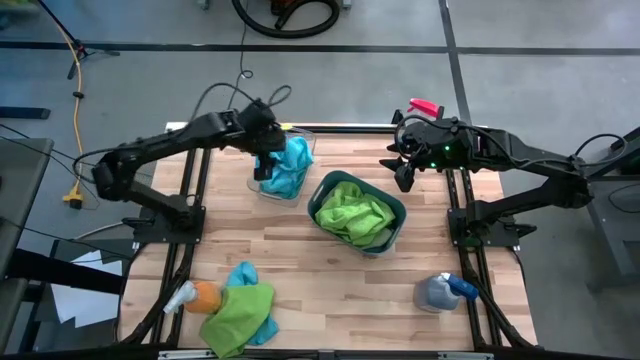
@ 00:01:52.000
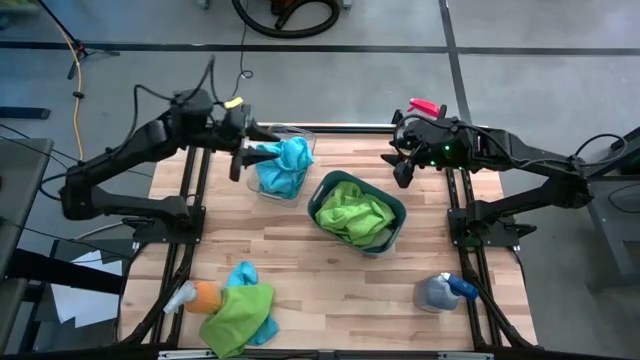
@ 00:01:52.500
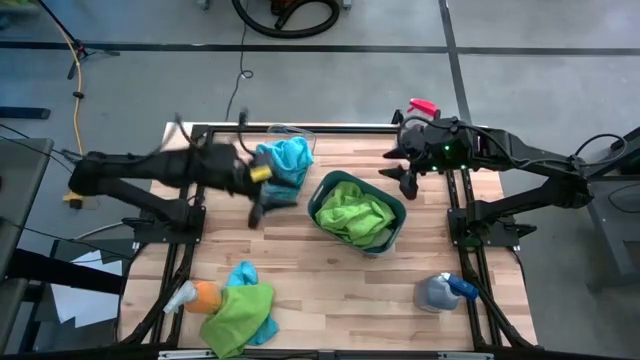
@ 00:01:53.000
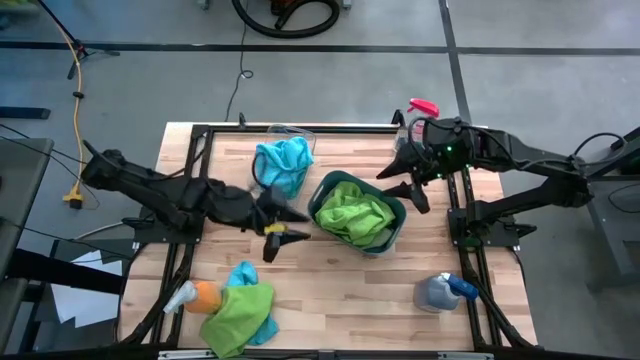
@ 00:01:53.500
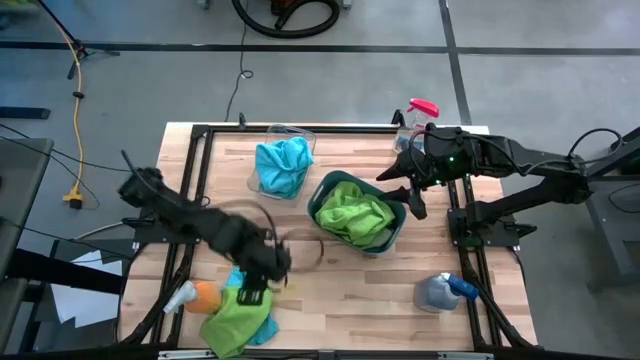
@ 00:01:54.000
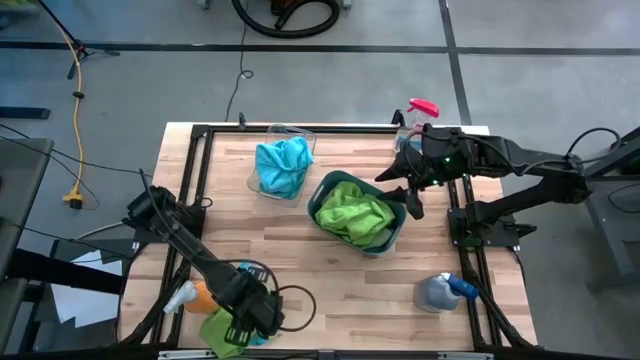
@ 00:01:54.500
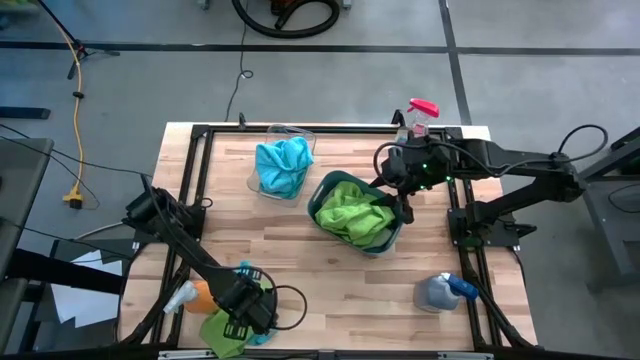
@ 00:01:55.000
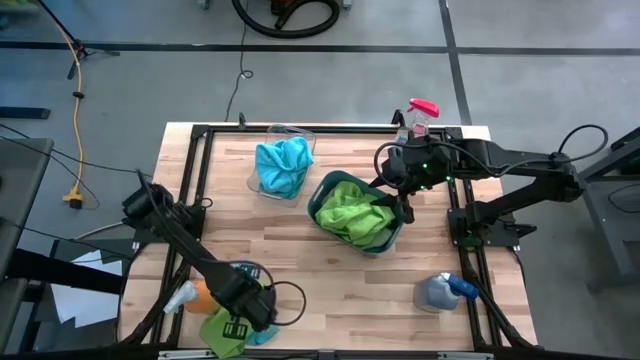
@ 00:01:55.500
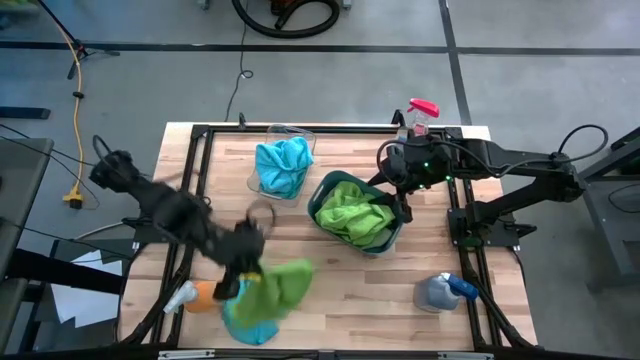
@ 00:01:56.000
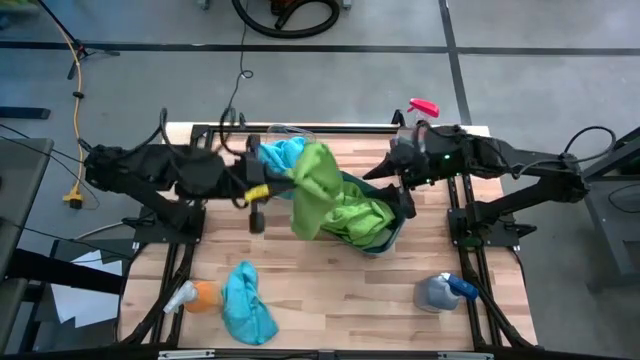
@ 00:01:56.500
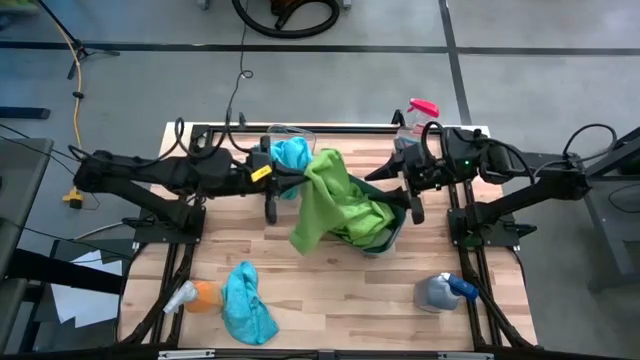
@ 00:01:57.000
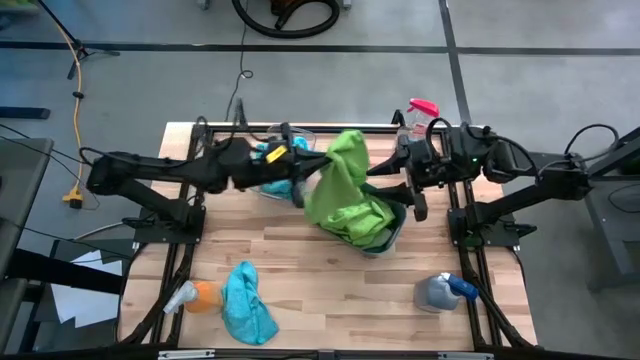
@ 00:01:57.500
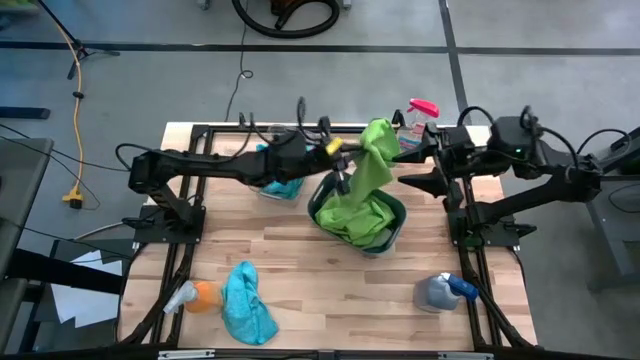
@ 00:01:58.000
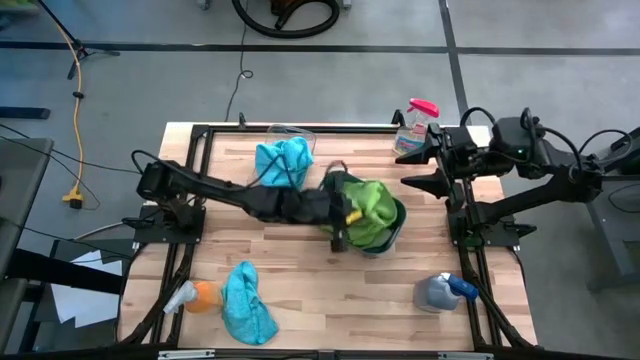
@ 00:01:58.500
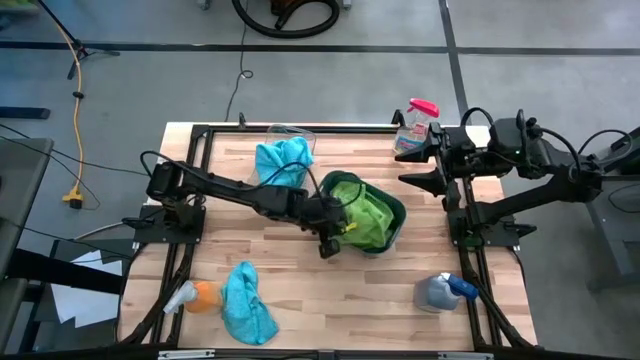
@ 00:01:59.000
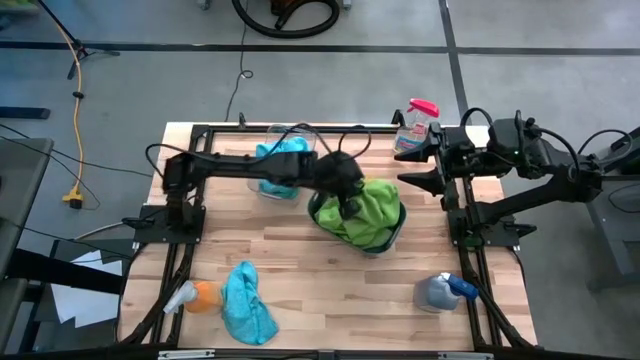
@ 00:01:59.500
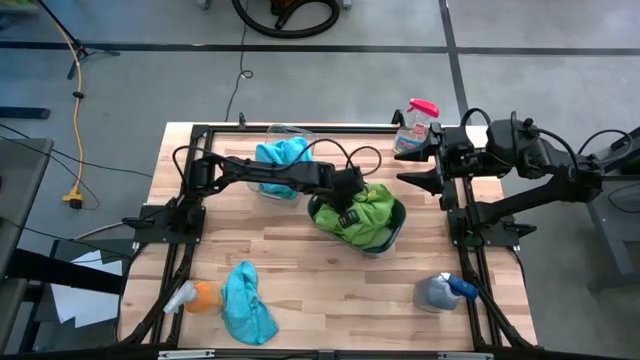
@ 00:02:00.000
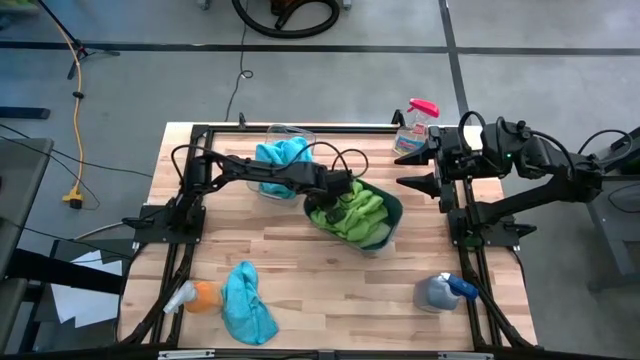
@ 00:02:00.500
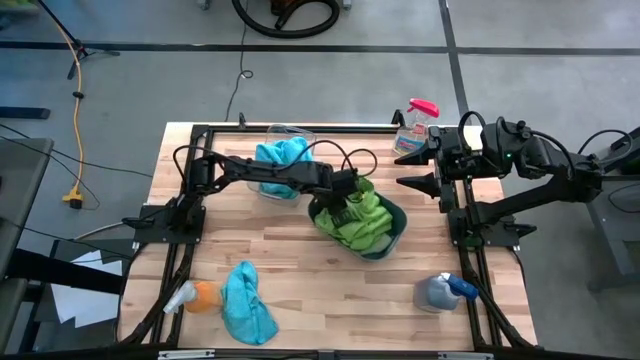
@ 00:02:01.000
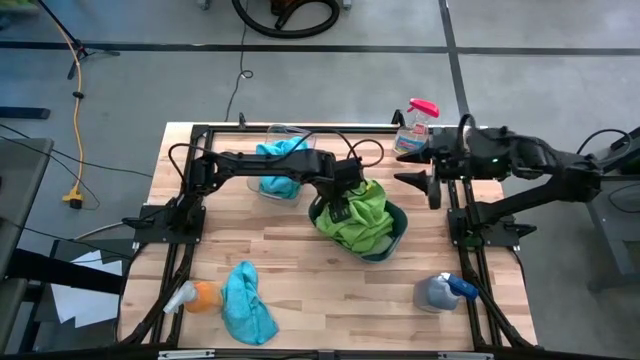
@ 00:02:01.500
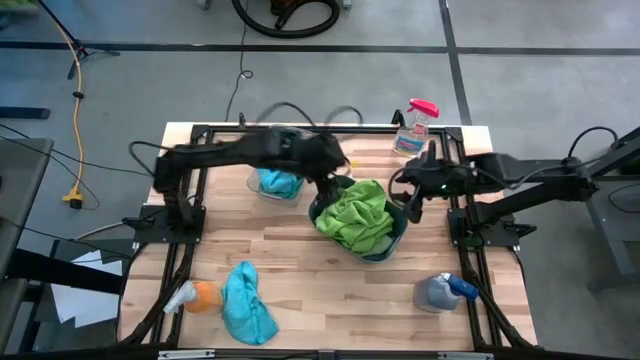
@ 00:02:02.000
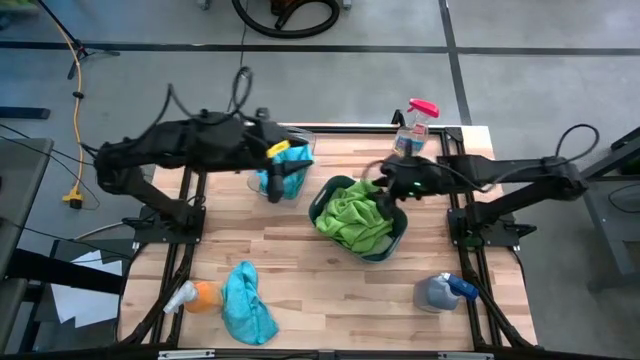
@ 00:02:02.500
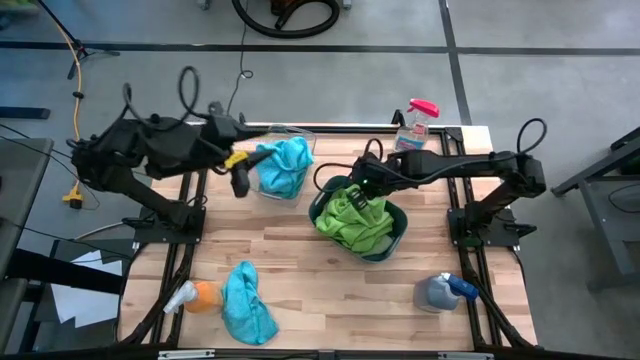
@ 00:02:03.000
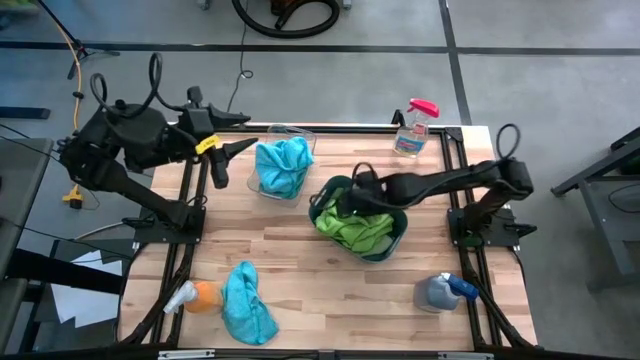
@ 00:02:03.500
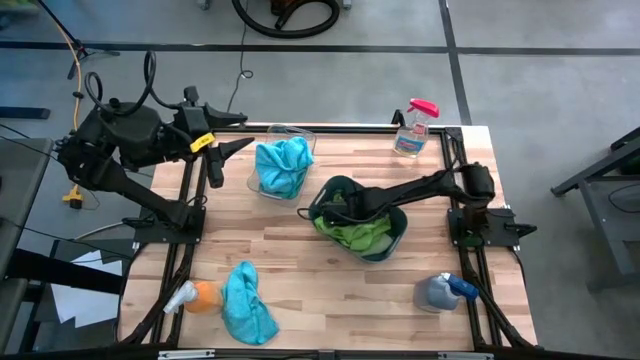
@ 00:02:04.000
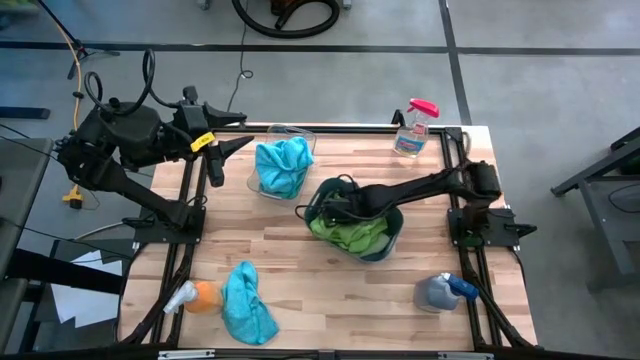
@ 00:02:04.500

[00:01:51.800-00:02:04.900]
Task: Sort microfiber towel by color & place in baskets
Put the green microfiber towel into the blue bin

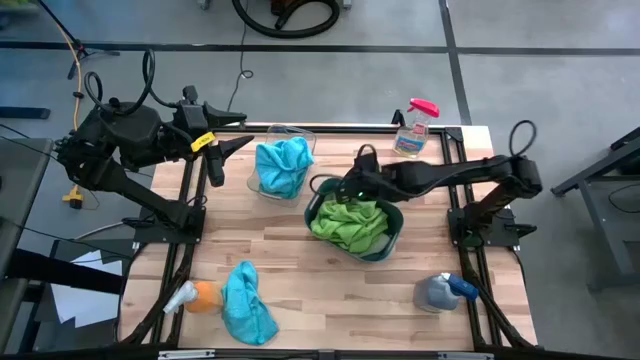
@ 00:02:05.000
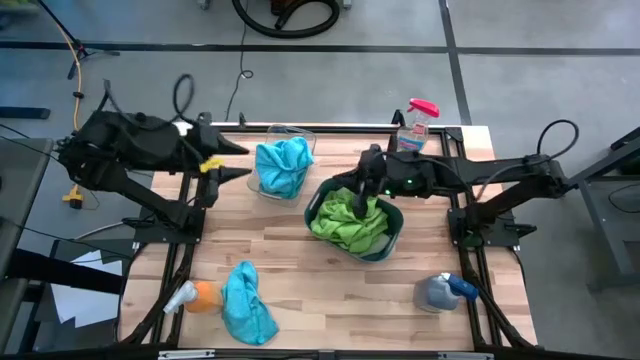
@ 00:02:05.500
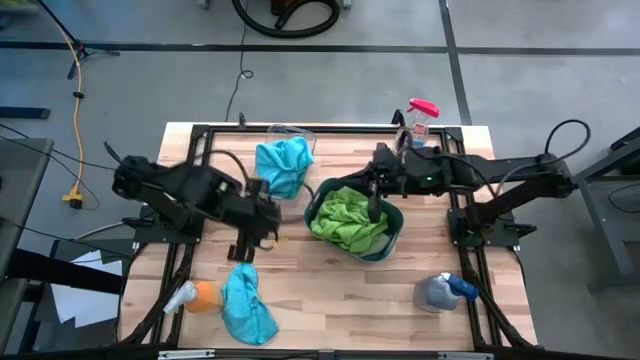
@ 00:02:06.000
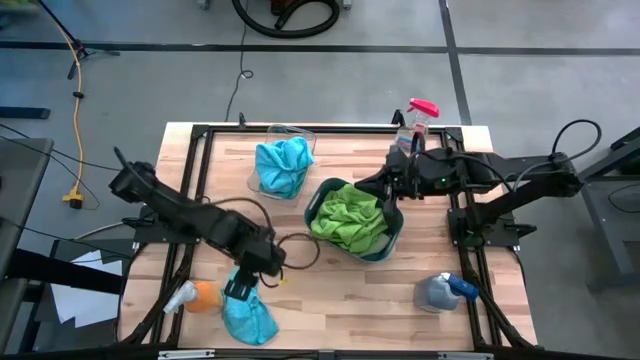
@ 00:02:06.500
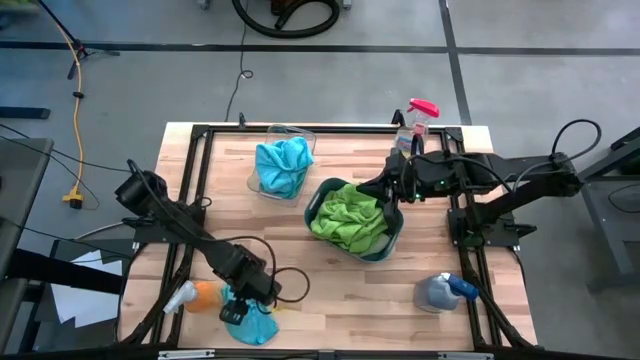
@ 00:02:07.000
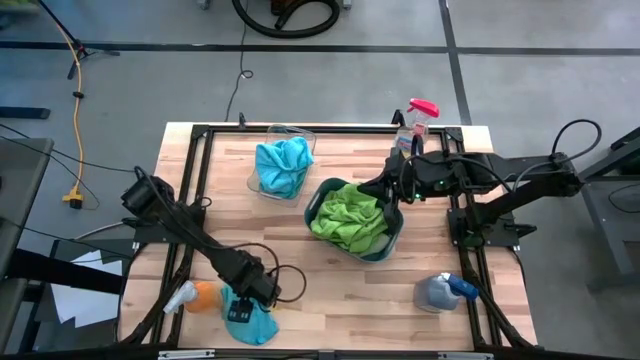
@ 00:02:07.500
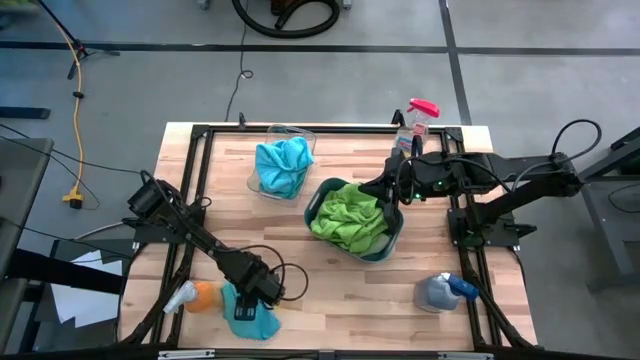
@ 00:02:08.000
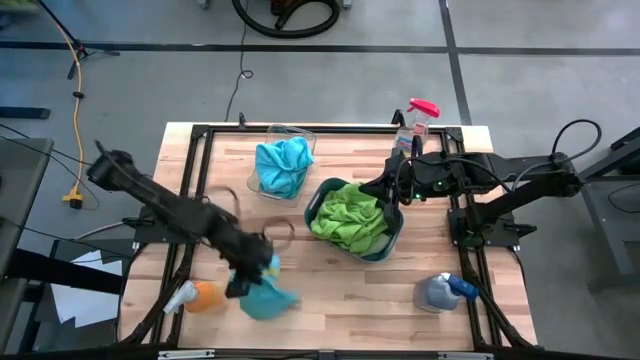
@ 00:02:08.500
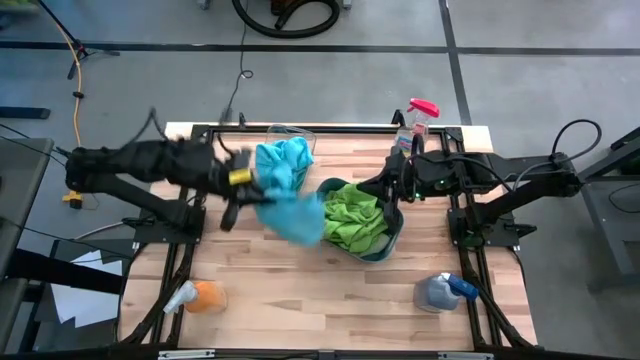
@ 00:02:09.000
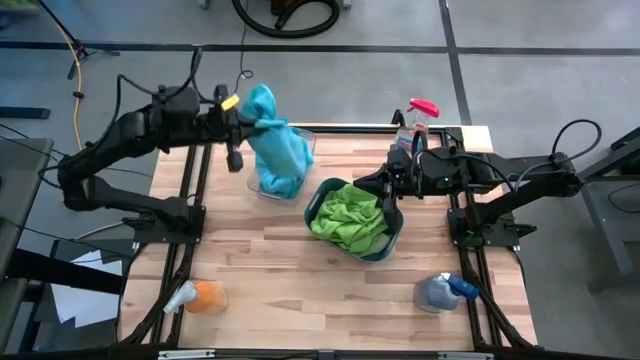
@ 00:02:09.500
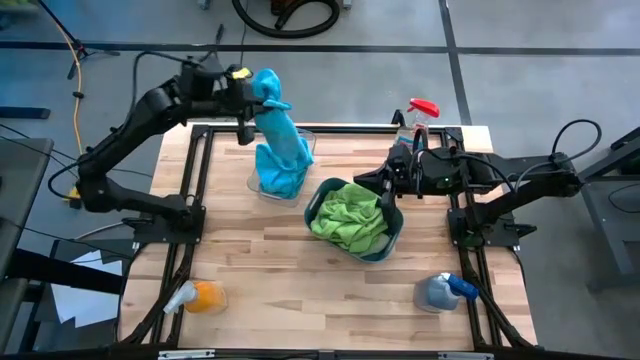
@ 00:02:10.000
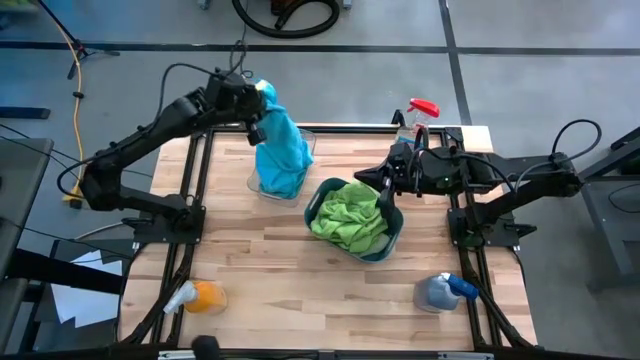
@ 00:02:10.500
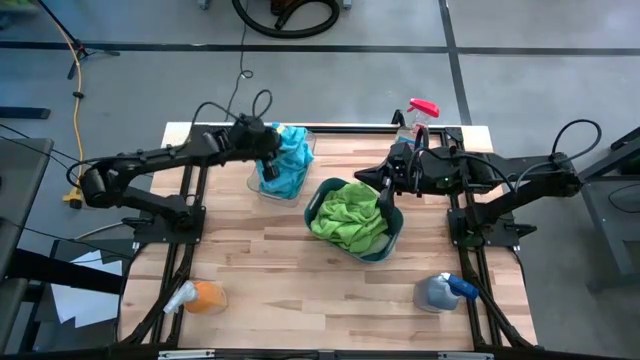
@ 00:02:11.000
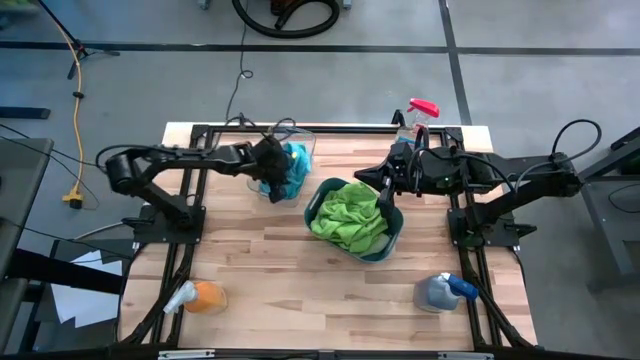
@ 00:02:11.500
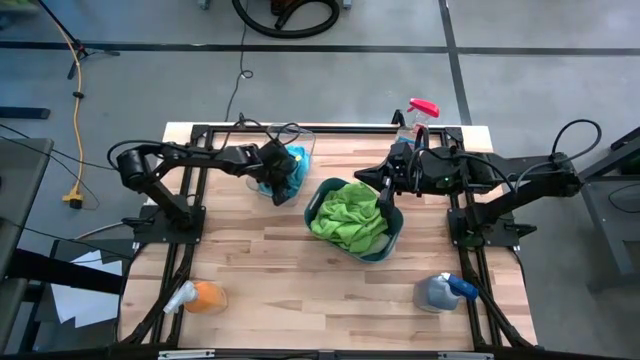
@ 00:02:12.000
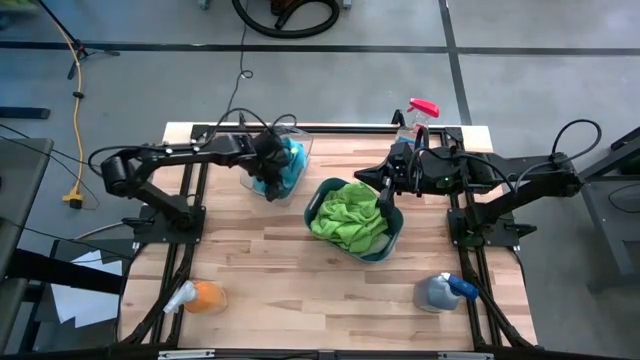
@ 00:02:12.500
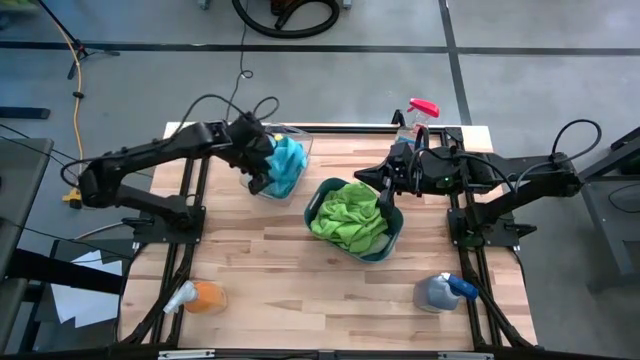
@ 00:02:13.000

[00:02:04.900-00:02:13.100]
Put the blue microfiber towel into the transparent bin

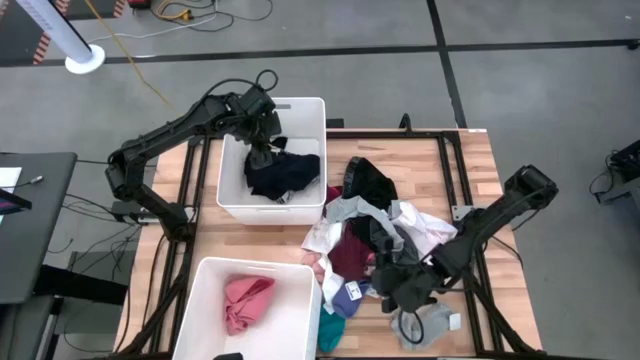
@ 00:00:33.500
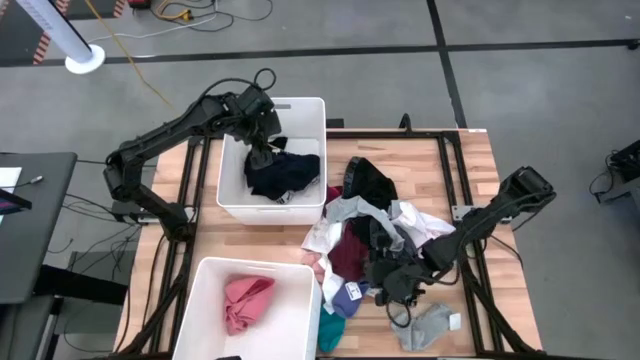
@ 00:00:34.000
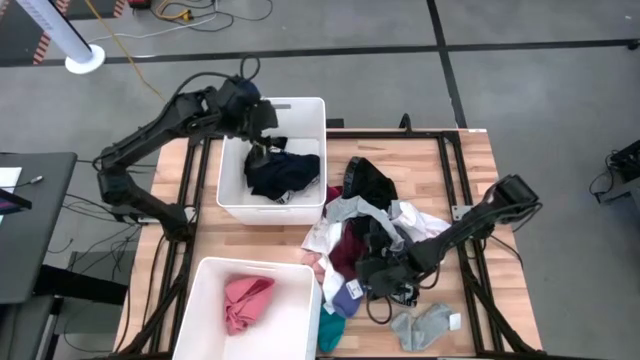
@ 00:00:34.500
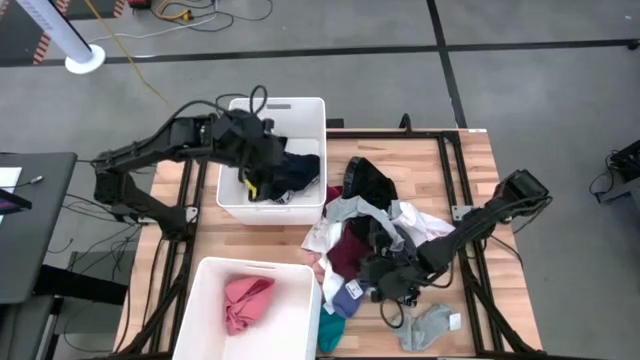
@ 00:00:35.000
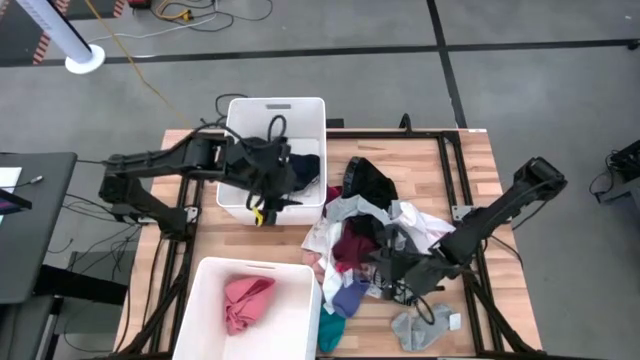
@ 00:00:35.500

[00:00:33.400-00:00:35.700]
Task: Sort clothes
Put the red underwear into the bottom white laundry bin
